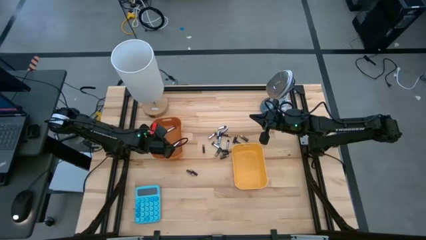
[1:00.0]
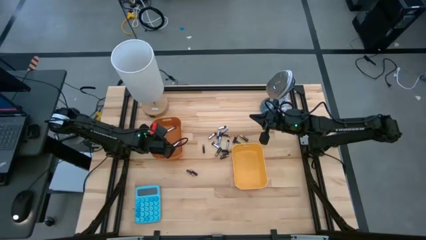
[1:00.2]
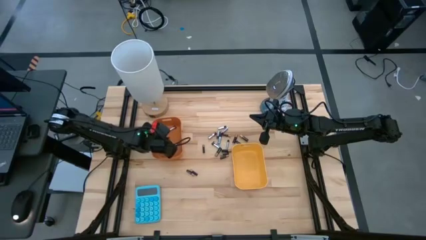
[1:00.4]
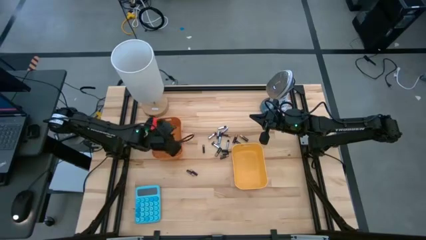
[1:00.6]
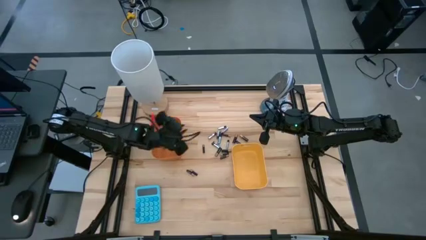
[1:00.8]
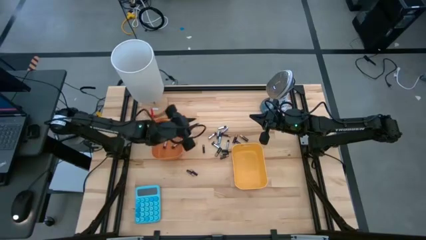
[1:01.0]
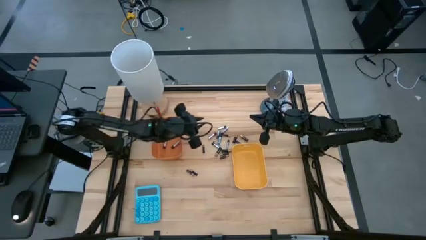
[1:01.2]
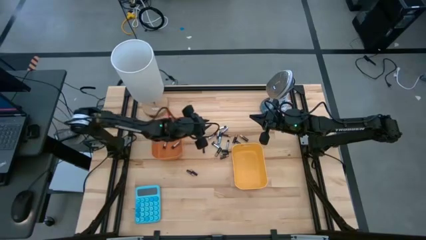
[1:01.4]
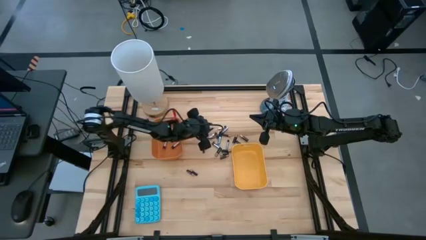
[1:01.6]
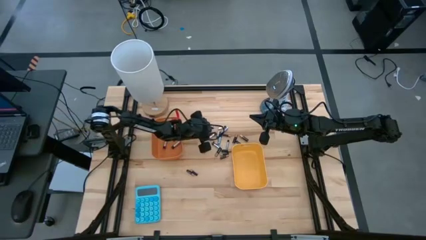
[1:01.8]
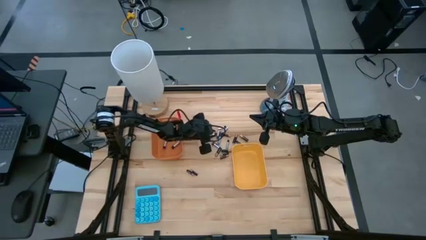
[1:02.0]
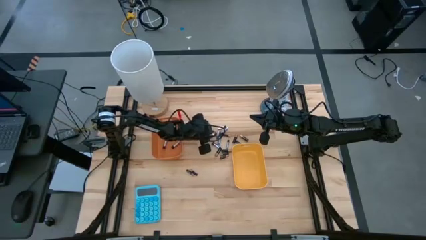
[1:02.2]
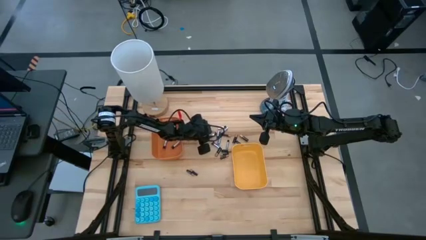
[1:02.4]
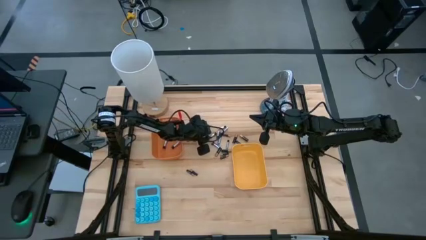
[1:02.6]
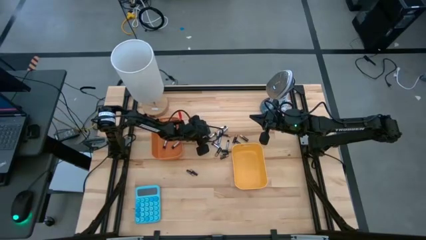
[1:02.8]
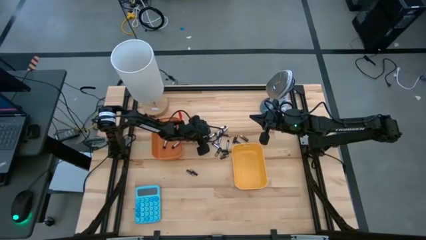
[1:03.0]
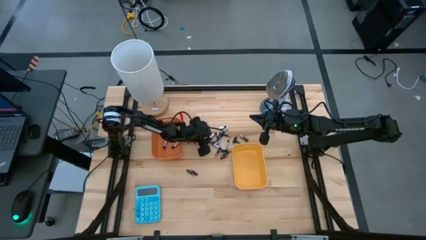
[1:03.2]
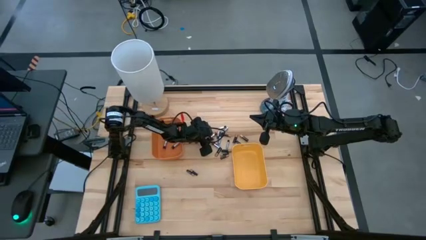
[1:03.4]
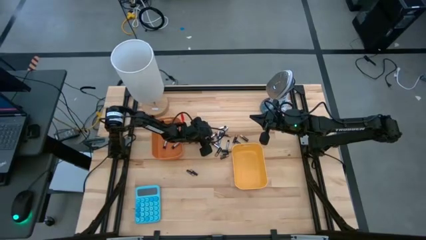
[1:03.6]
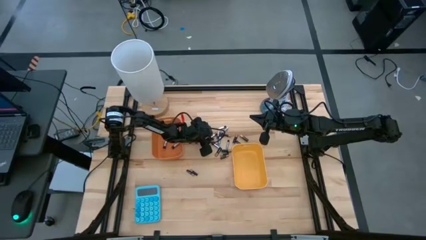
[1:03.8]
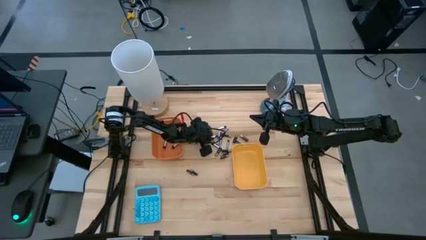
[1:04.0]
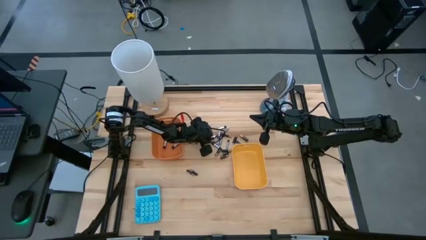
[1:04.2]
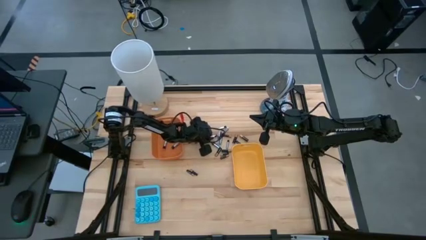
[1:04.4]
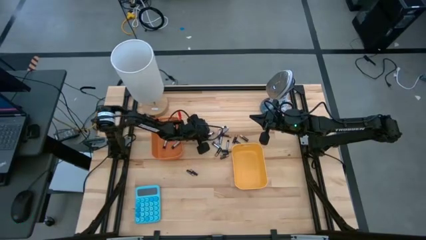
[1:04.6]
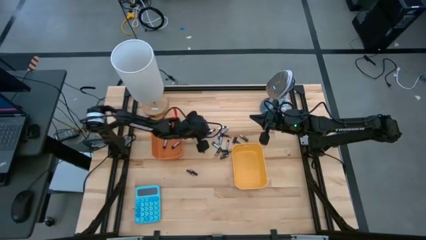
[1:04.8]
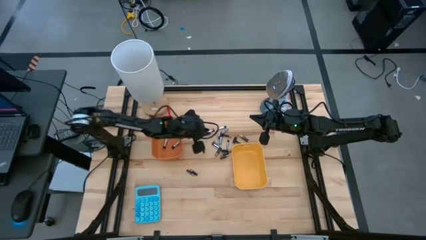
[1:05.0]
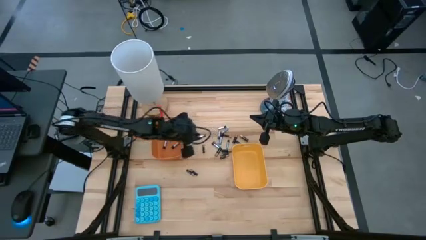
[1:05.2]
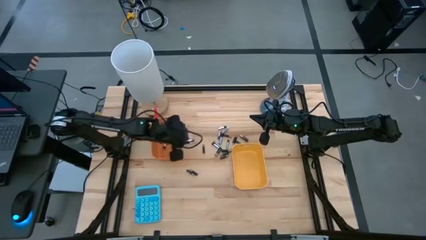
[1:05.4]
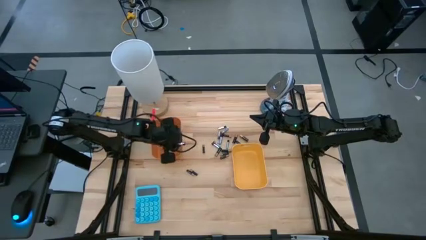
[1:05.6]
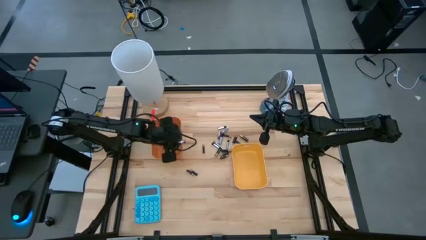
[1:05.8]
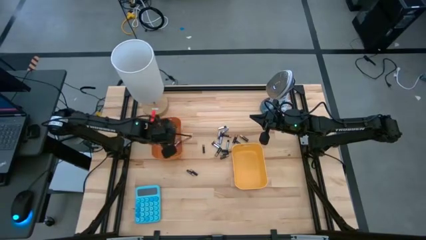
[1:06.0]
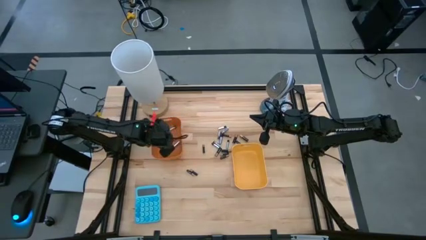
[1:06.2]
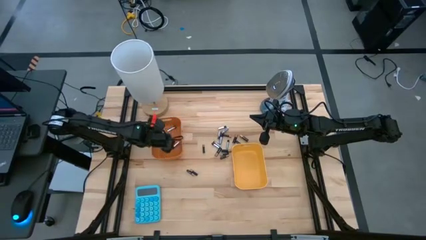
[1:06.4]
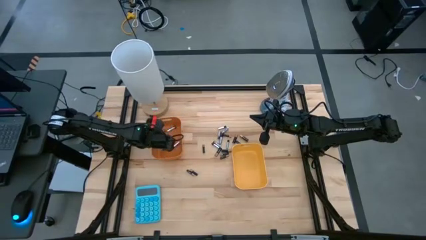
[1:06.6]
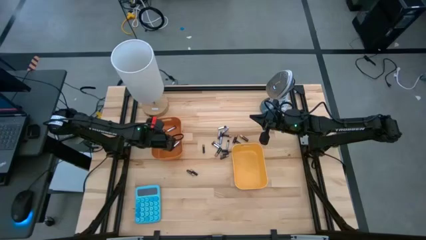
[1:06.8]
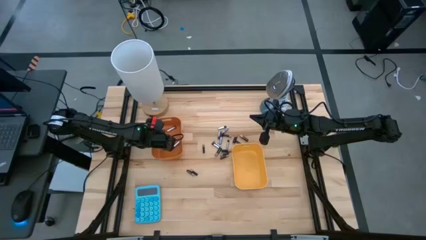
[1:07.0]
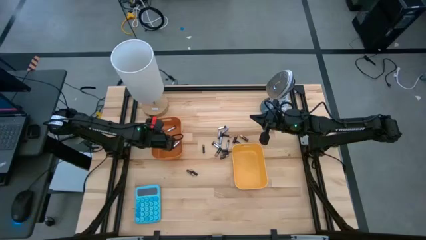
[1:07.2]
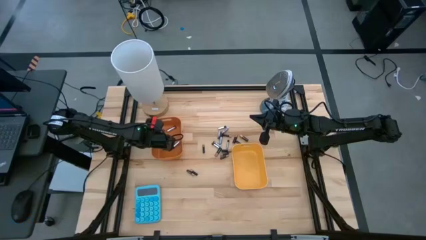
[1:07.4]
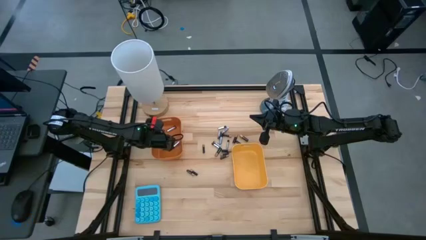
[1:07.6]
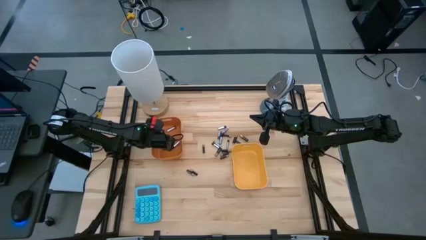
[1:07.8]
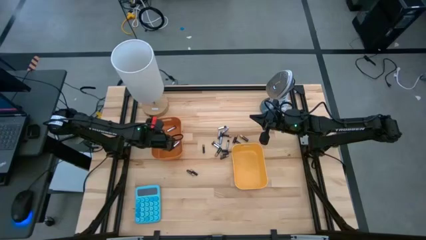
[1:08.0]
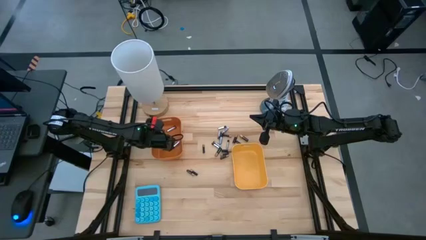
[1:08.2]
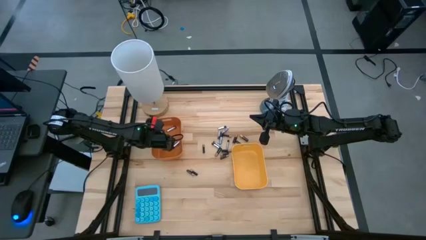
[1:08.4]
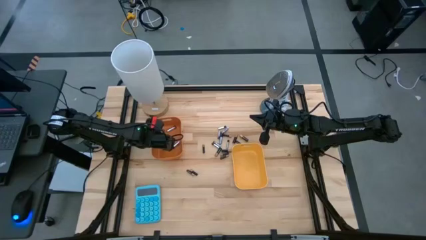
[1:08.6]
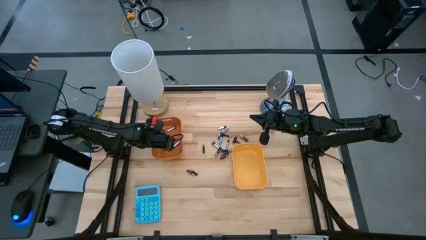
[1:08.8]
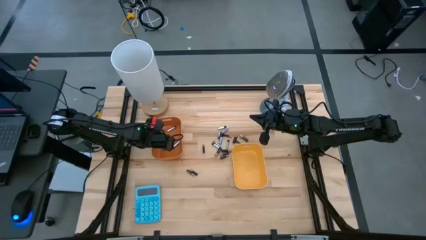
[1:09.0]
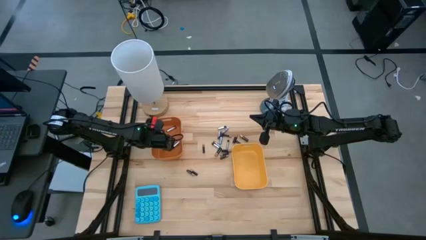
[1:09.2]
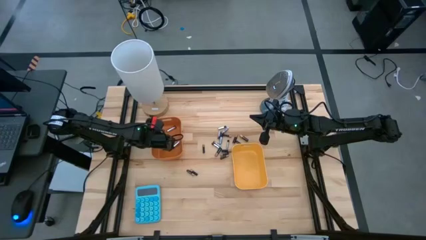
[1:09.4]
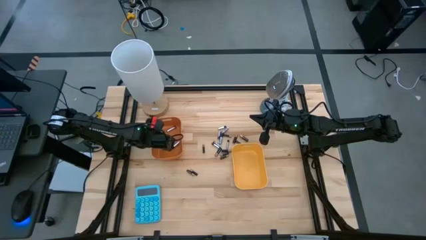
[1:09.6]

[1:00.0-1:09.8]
Task: Sort batteries
Put the silver battery into the orange bin

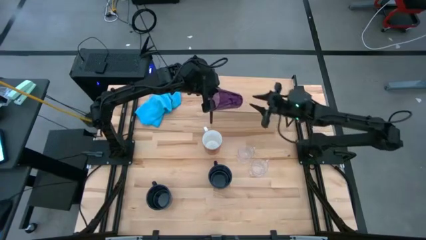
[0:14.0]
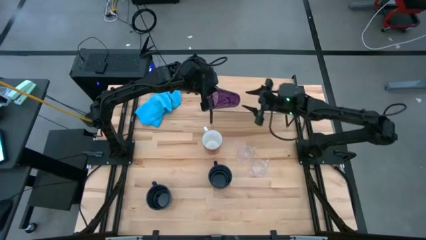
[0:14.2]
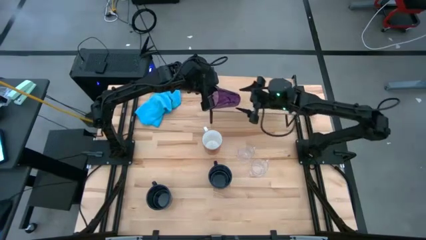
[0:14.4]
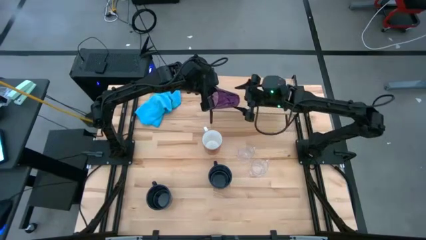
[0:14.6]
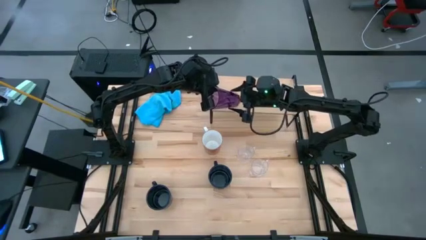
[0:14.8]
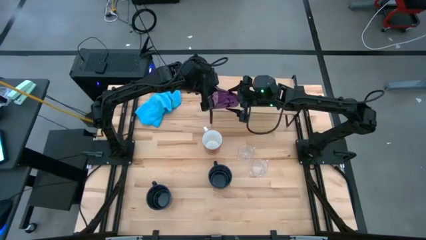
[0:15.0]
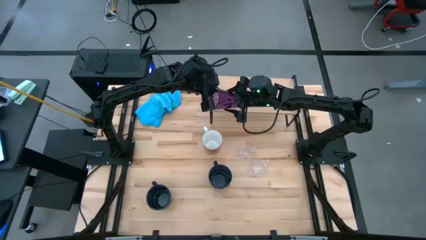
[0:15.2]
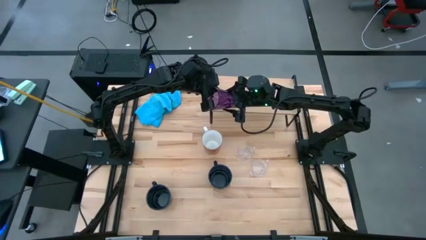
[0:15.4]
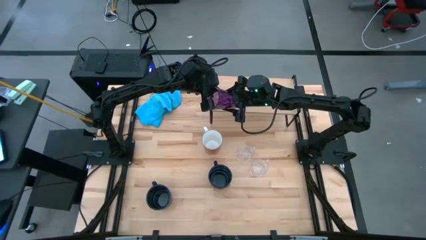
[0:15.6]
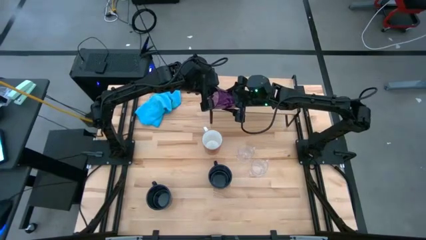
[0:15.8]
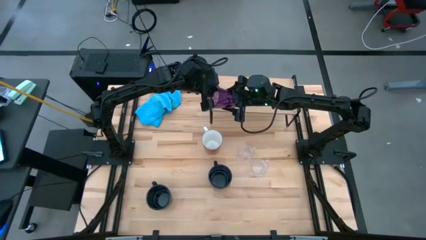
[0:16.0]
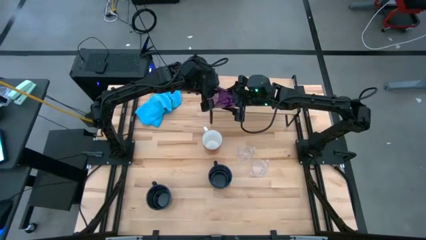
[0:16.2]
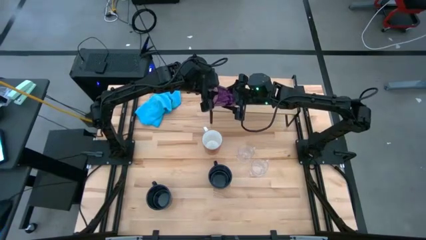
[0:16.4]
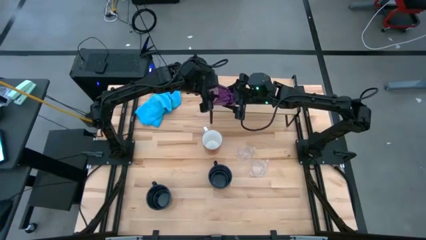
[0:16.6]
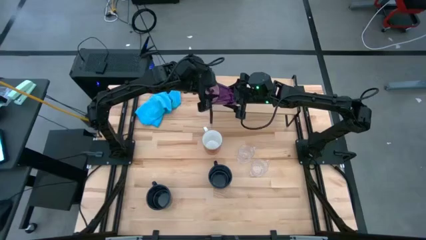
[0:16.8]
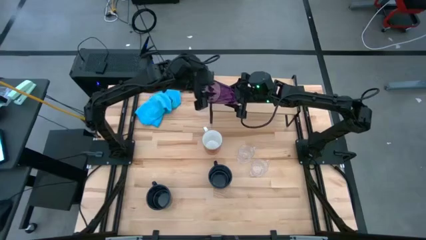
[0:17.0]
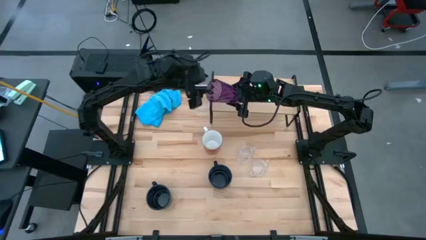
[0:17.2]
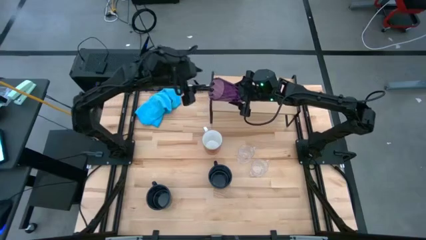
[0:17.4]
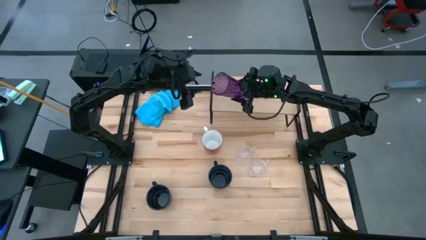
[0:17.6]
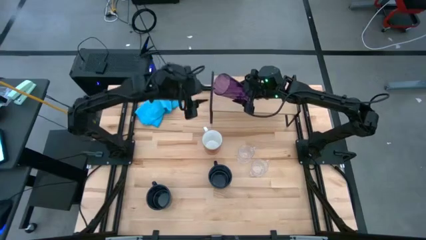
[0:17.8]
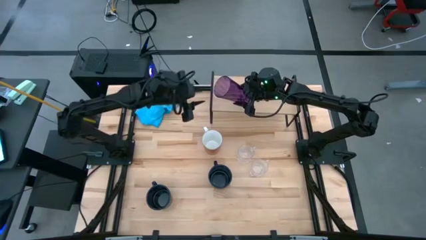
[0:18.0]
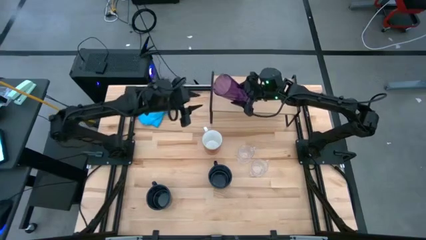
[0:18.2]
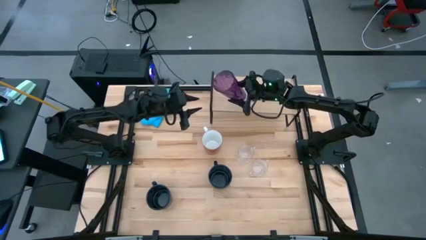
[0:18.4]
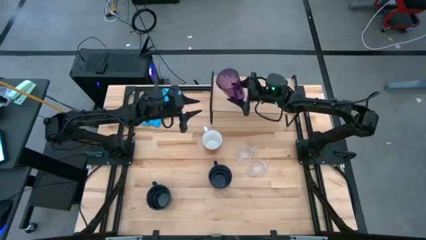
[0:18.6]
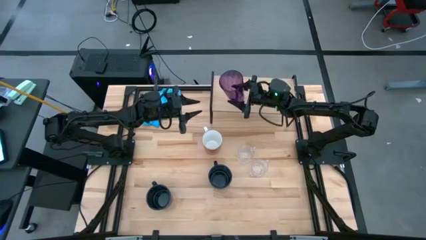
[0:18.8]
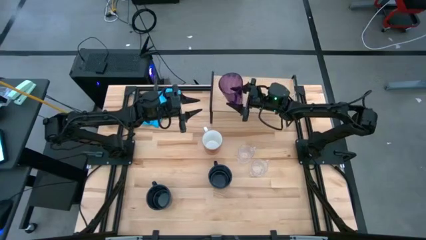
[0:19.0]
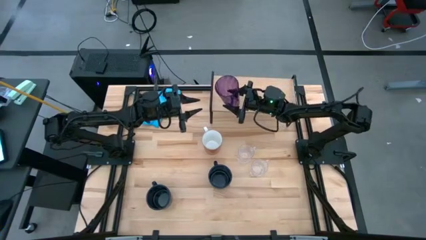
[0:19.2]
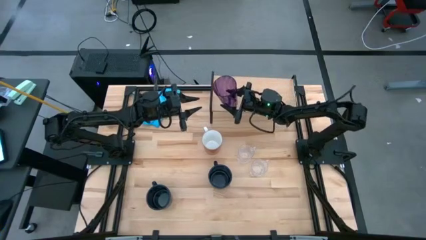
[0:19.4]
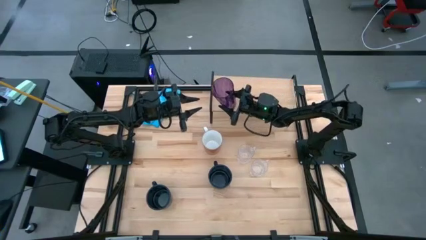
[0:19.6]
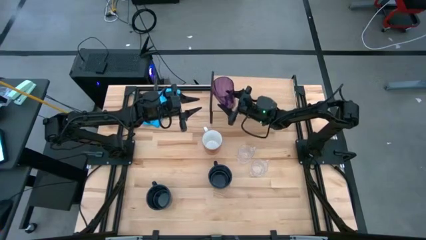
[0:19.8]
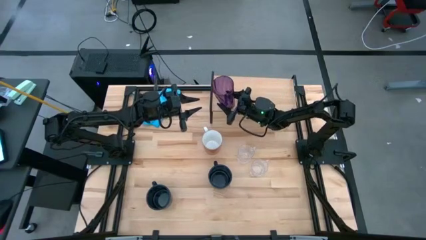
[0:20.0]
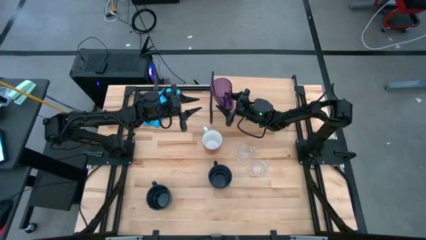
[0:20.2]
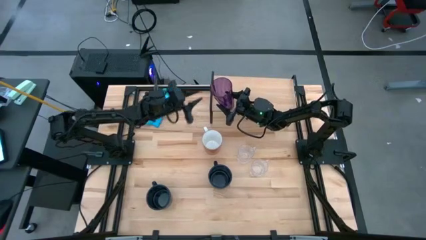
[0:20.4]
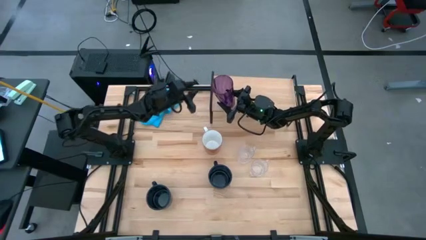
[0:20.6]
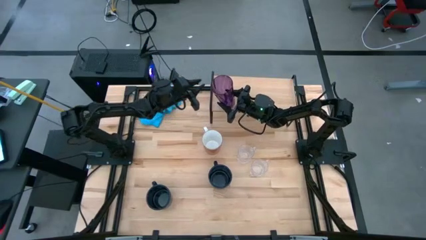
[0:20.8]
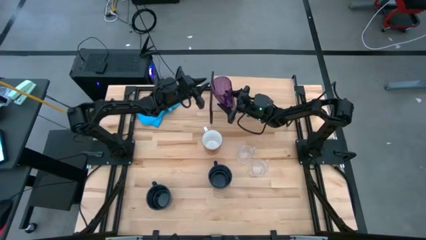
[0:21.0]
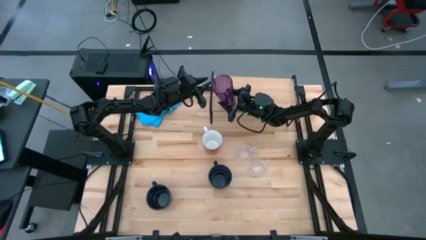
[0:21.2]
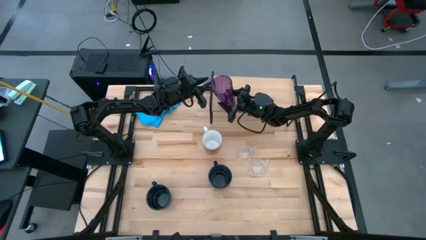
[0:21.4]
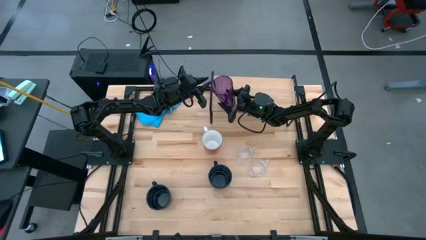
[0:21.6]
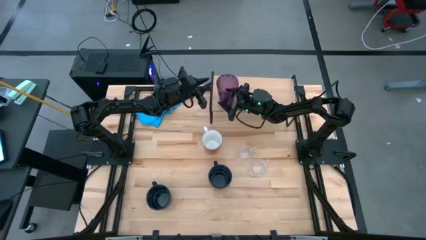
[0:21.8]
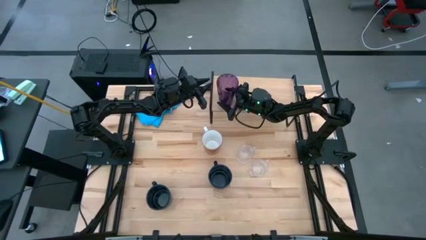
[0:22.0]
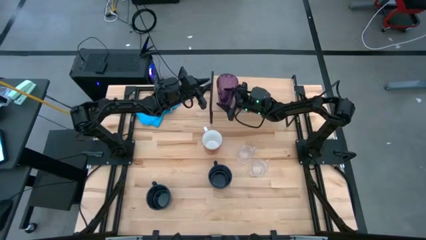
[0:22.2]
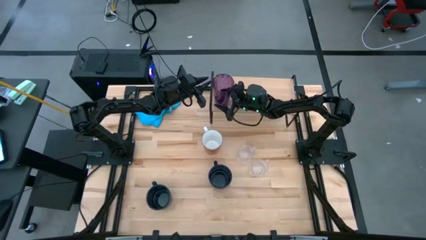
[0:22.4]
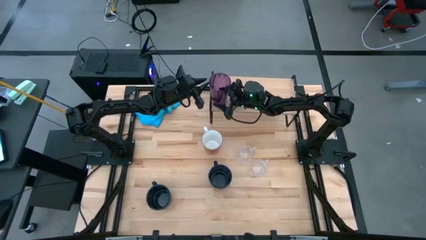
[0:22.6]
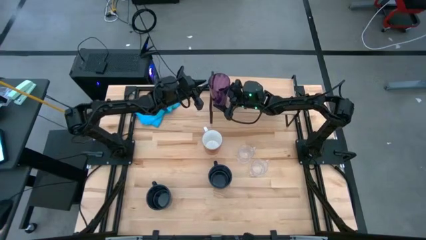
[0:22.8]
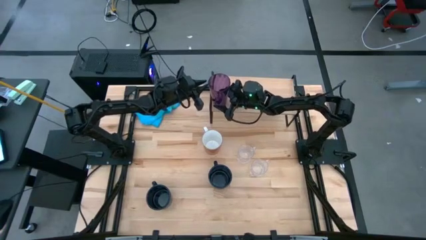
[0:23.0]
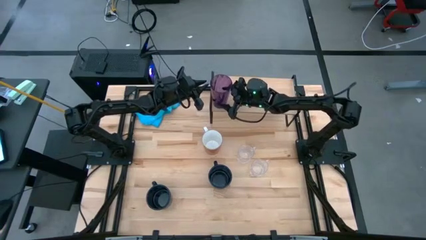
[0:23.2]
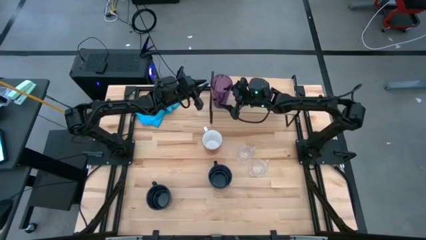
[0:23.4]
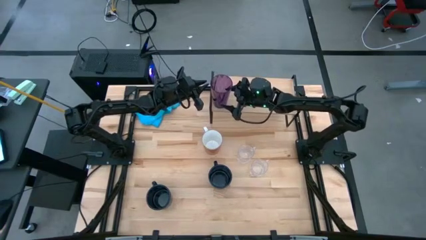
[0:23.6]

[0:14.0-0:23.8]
Task: Stack small to large cups/mugs on shelf
Put the purple cup on the shelf
